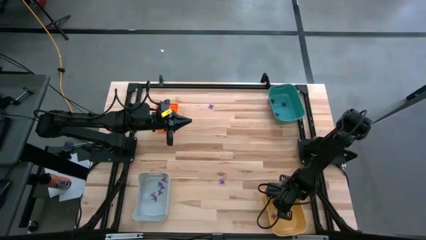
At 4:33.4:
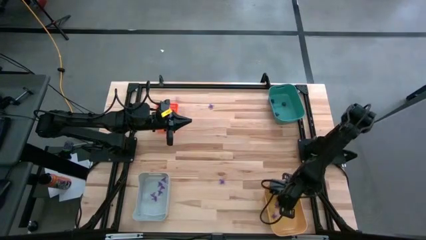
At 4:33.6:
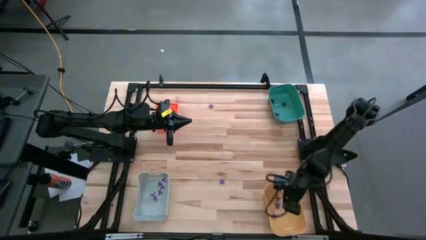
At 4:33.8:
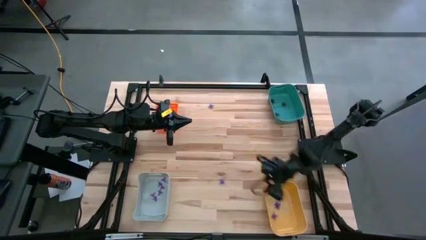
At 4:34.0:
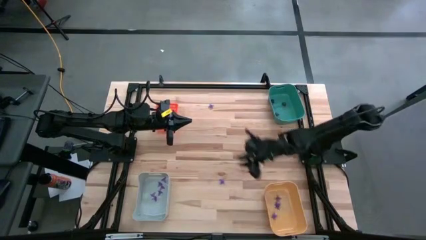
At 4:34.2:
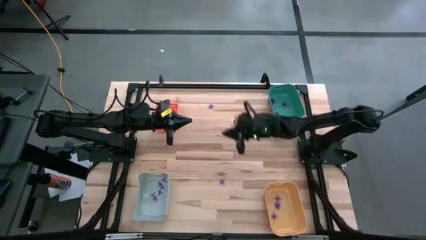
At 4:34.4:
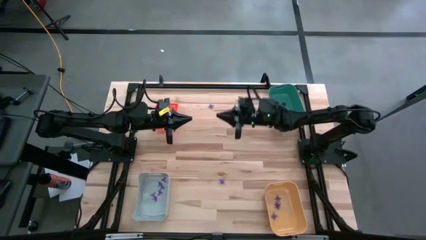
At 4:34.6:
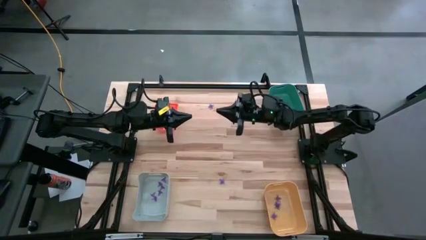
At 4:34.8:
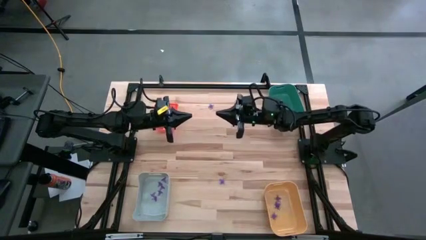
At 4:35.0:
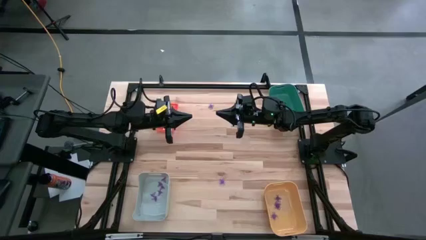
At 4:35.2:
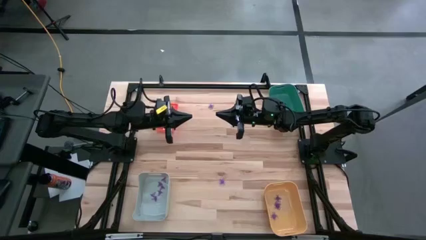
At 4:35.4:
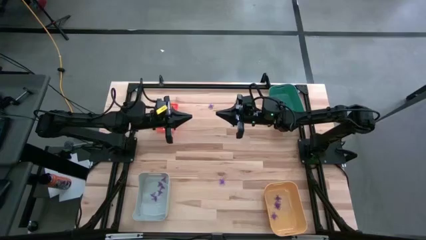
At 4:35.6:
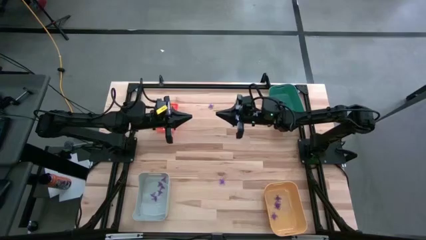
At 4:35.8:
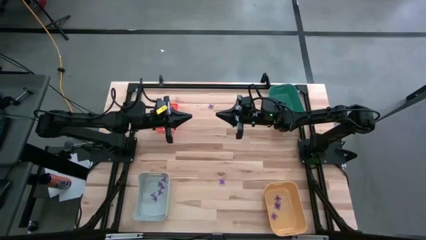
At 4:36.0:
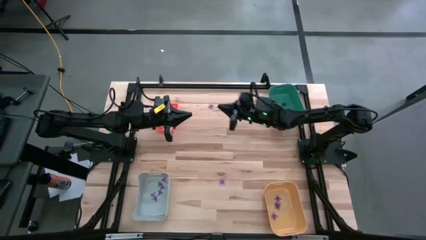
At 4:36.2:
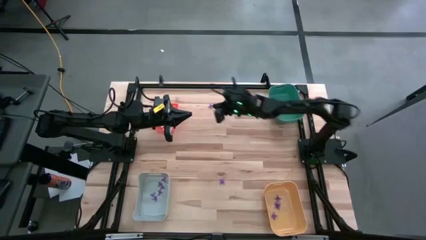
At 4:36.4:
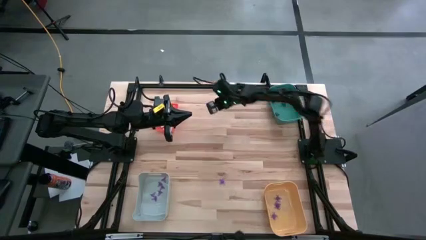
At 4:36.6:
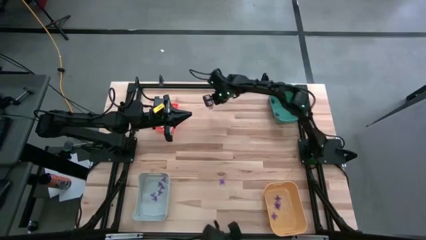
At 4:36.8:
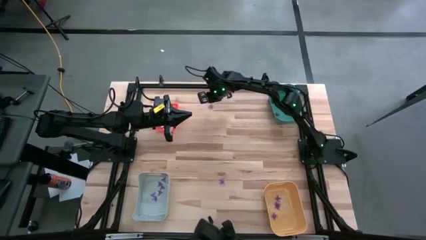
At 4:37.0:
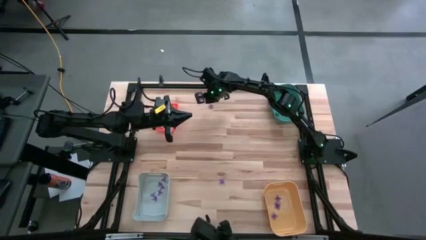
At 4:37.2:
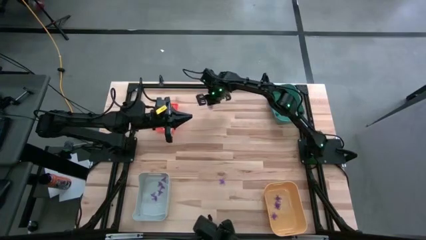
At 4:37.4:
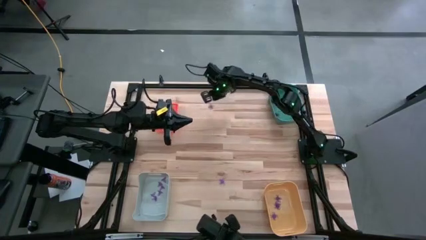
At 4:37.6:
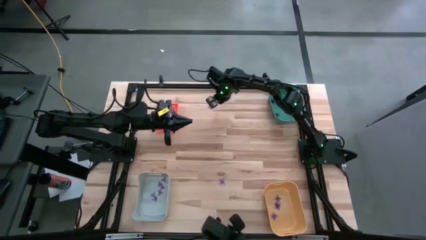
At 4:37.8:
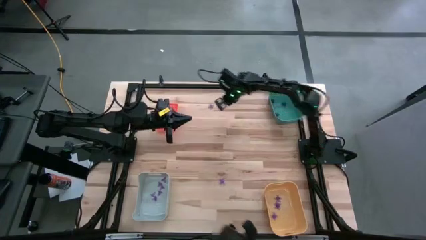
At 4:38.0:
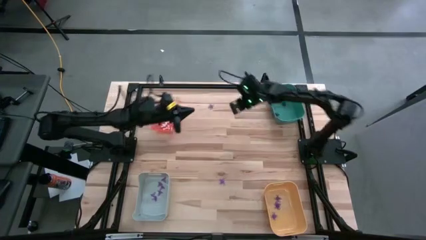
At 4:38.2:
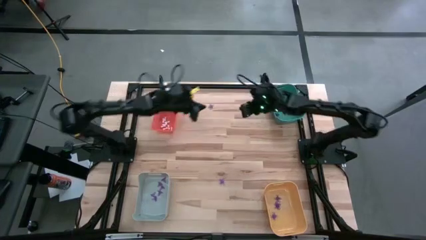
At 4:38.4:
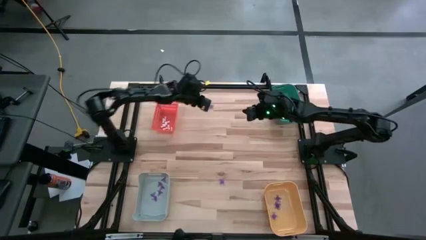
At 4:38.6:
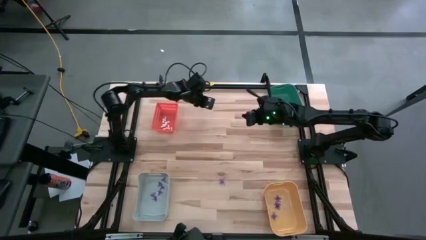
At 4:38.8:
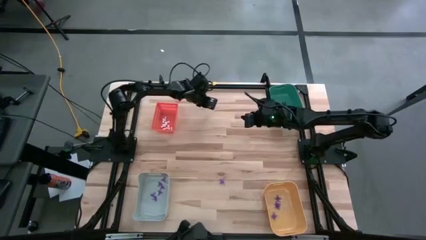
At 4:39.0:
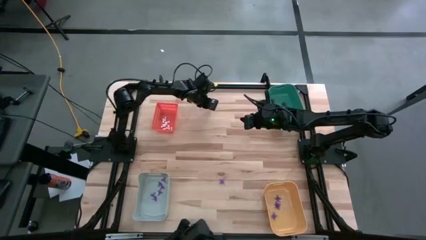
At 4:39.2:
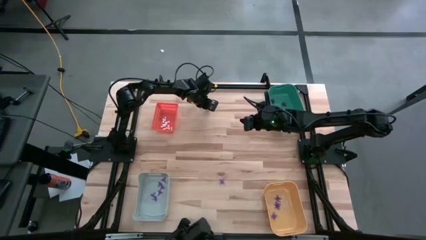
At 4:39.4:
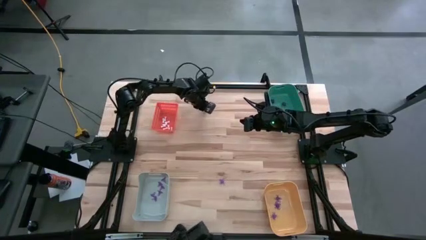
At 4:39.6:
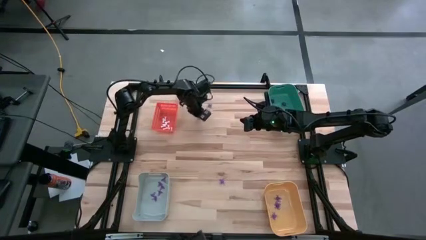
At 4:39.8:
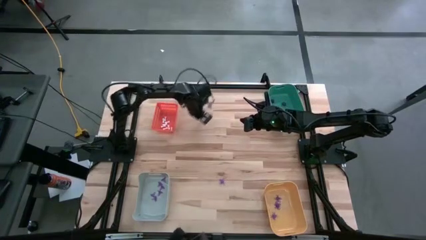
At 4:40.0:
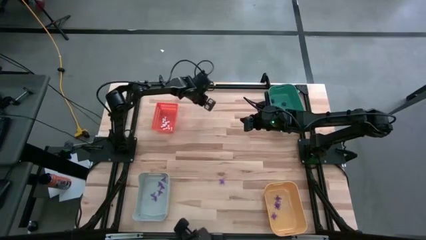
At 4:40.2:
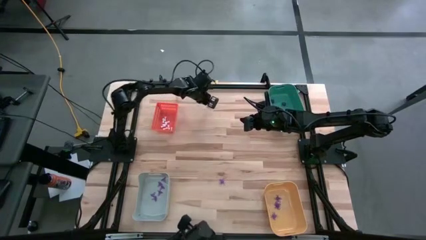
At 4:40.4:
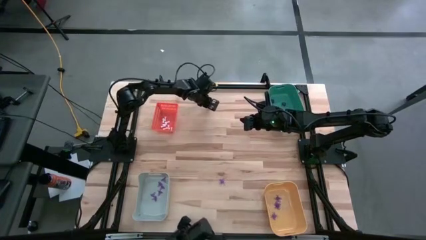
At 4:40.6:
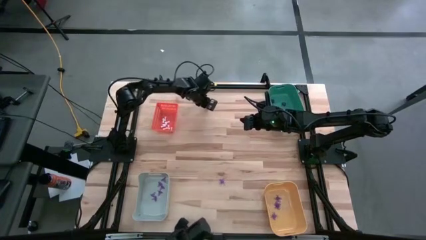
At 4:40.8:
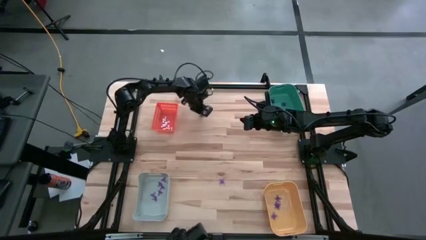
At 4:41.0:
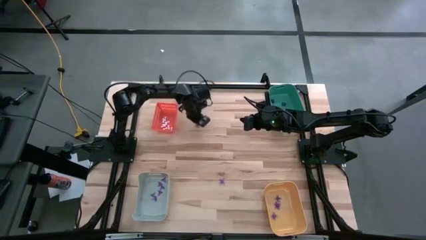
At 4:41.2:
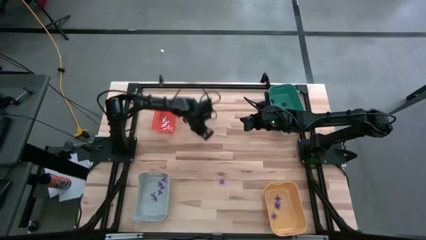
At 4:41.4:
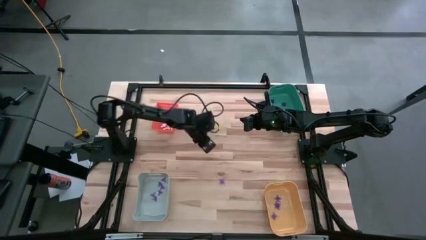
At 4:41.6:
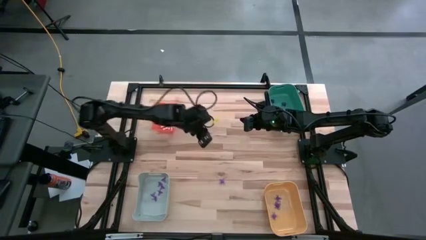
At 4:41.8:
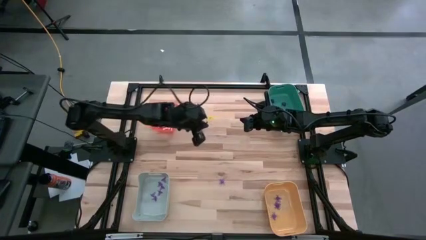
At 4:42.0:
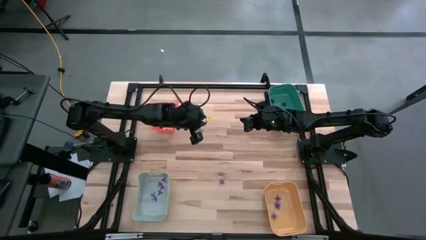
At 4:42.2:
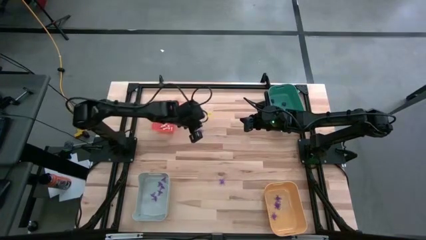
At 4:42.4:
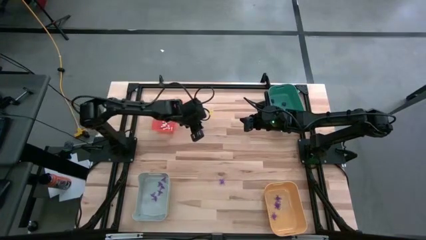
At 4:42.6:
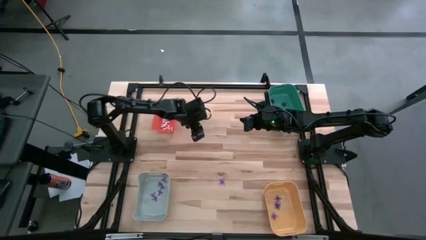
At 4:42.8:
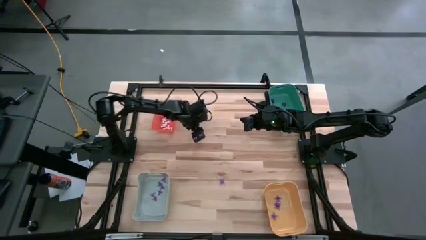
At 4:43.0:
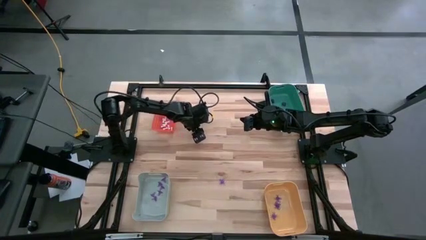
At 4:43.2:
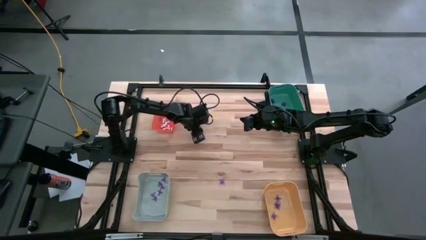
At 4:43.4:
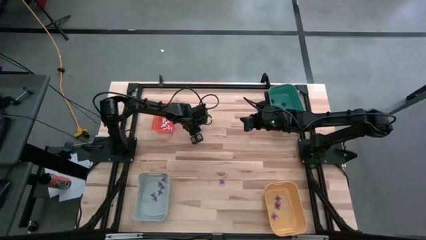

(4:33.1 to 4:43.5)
Task: Sort Halloween decoration
Put the violet spider toy into the yellow bin

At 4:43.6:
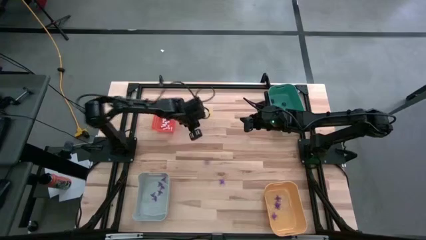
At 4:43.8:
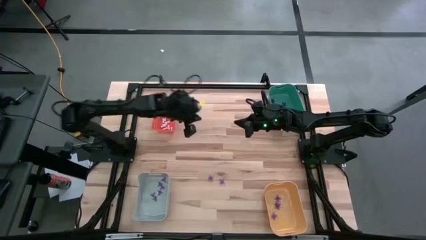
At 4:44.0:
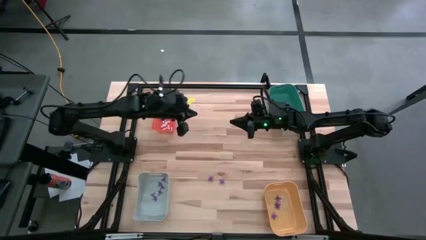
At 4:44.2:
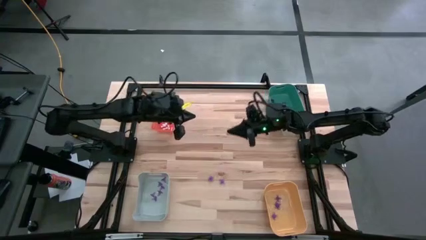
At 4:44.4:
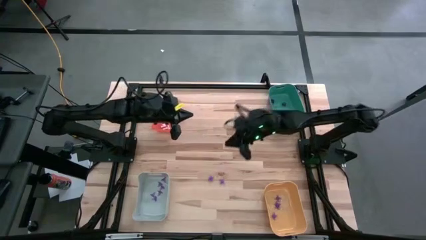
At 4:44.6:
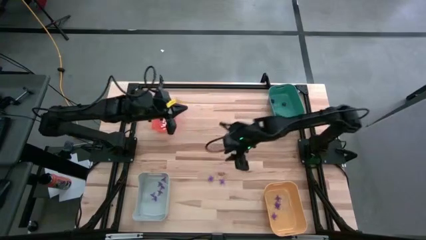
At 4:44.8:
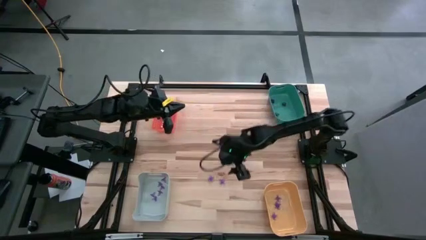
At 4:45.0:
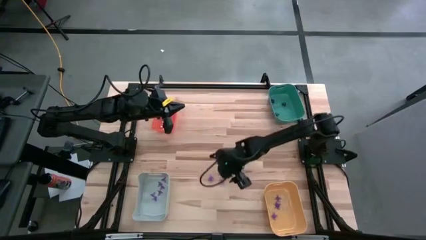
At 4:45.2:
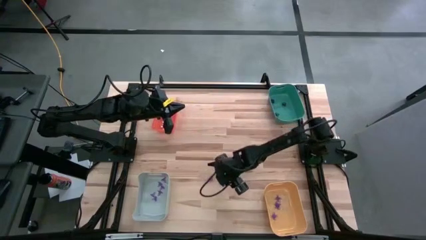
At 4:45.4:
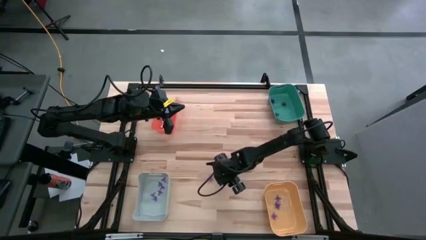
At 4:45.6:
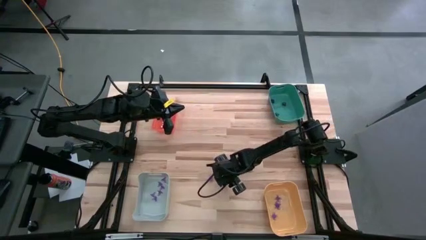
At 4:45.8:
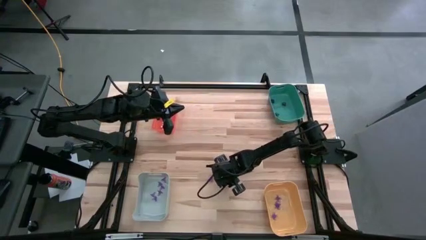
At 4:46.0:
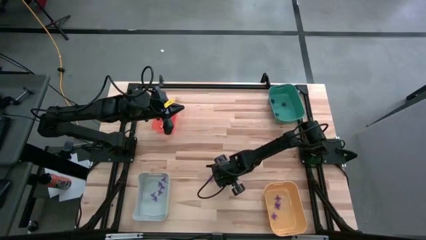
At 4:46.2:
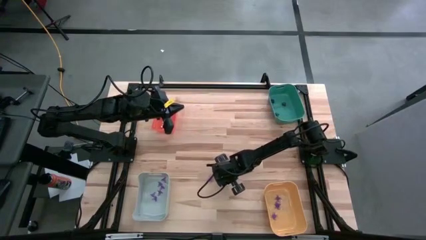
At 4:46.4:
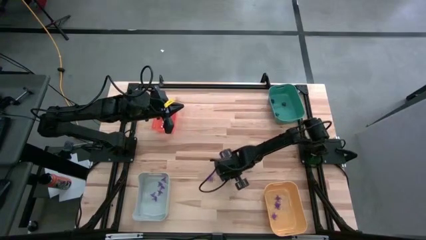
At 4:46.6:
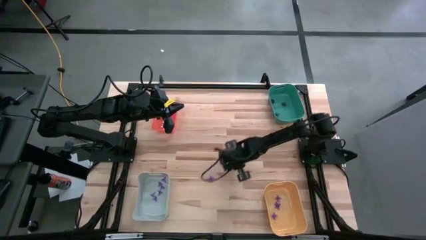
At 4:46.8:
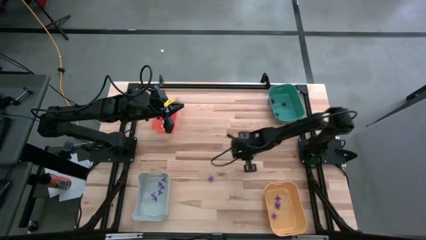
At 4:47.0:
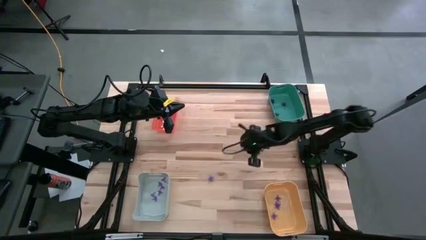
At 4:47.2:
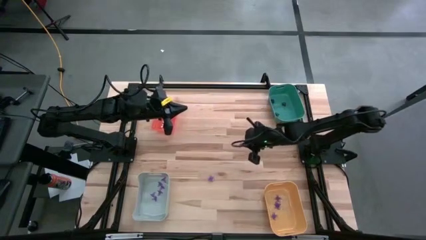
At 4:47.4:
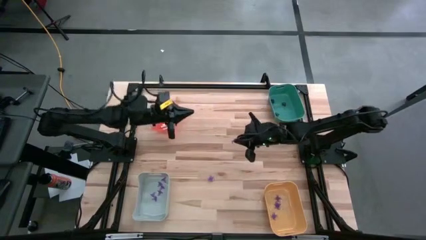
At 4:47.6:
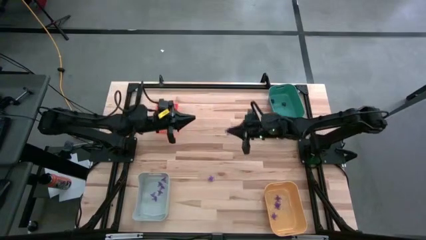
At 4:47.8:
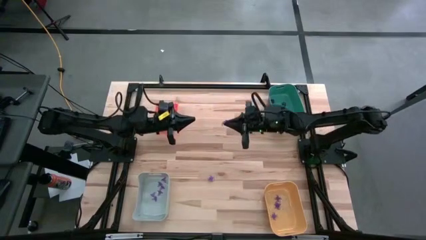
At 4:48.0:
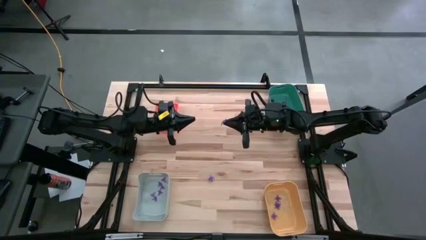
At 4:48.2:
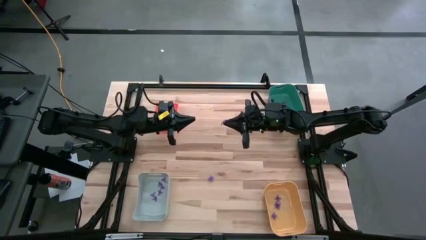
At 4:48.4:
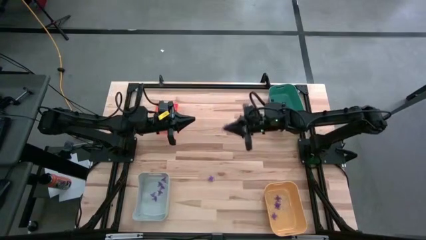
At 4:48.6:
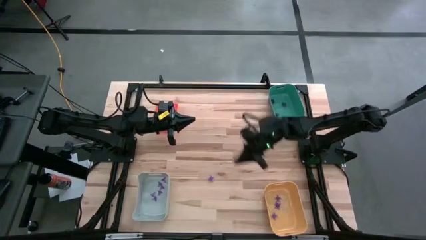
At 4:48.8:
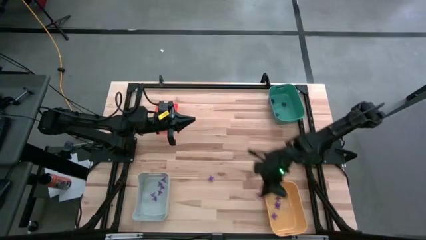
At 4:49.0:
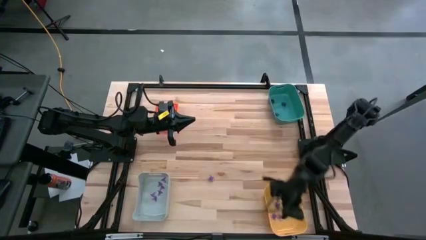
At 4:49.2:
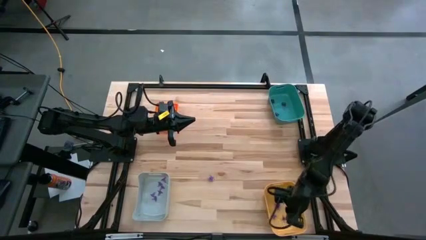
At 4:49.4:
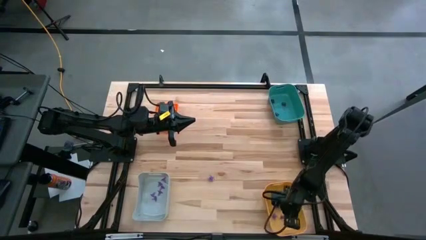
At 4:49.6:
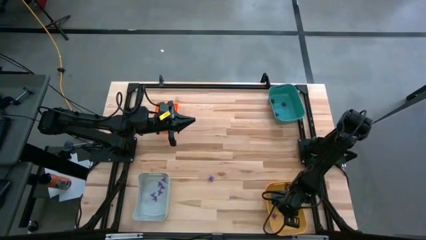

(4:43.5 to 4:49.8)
Put the violet spider toy into the yellow bin
